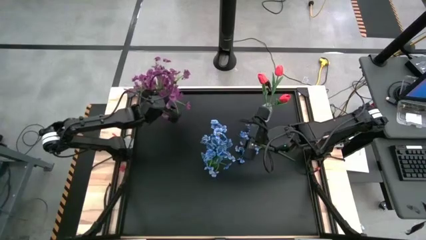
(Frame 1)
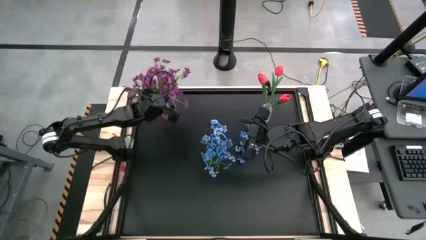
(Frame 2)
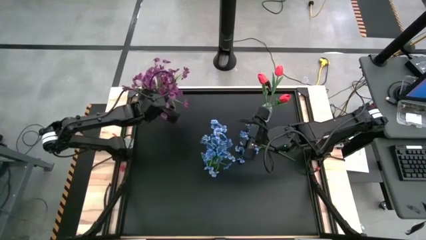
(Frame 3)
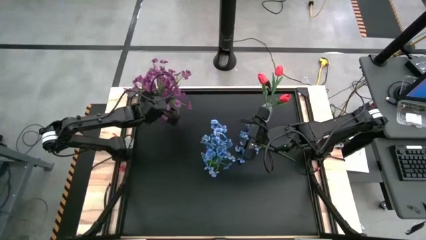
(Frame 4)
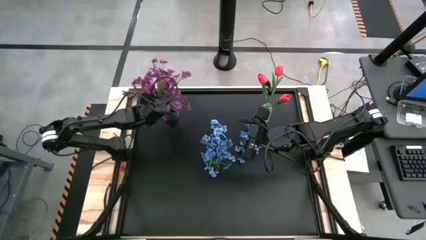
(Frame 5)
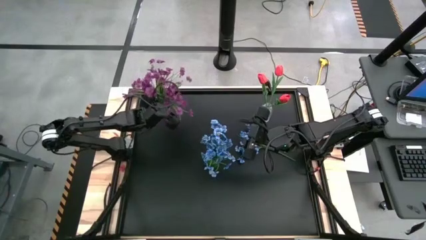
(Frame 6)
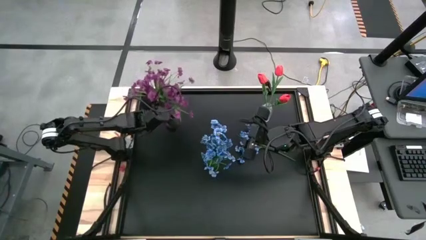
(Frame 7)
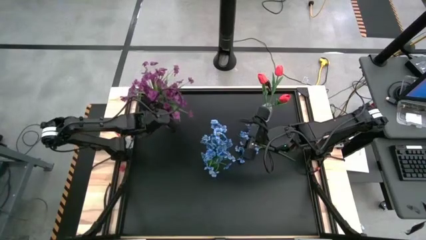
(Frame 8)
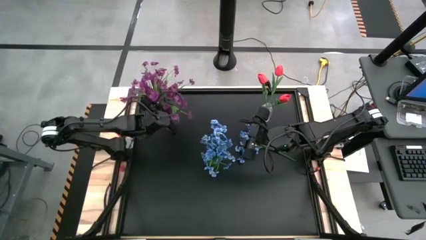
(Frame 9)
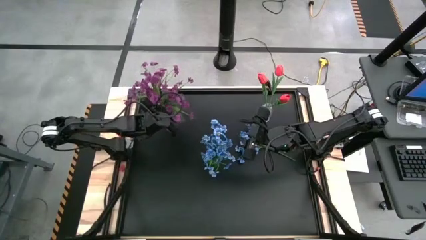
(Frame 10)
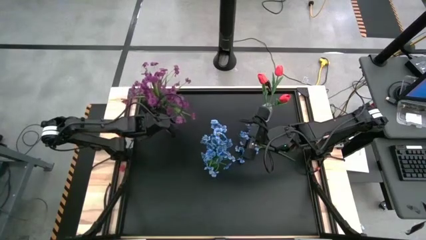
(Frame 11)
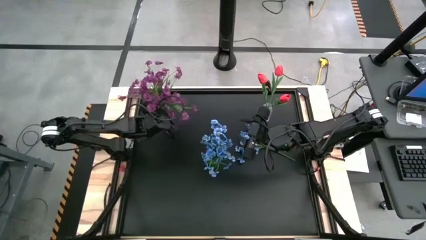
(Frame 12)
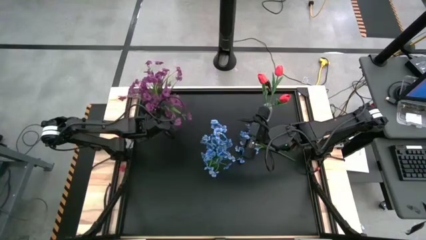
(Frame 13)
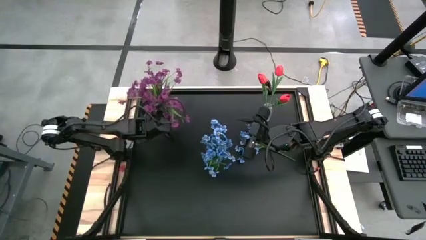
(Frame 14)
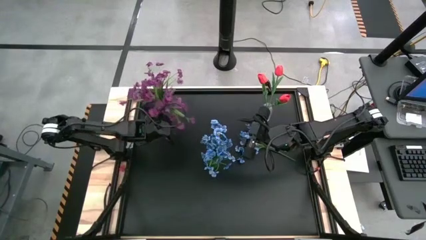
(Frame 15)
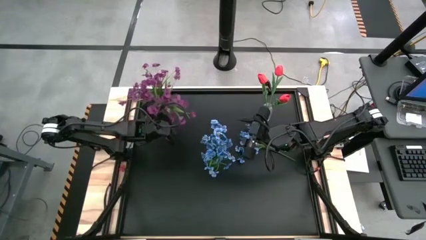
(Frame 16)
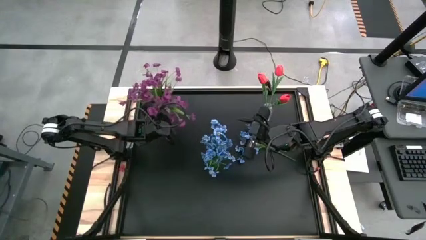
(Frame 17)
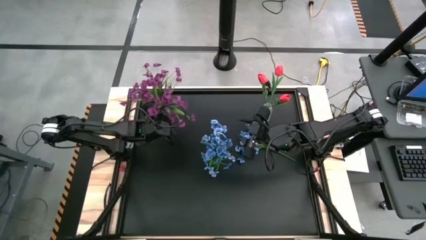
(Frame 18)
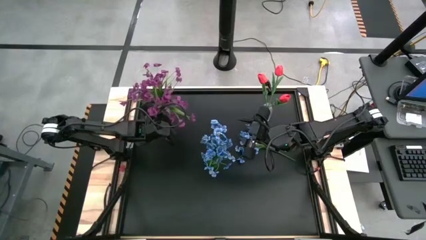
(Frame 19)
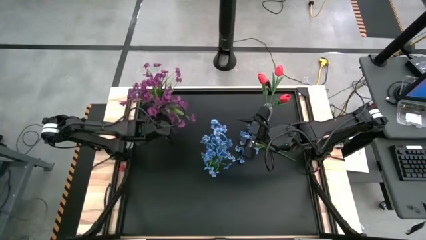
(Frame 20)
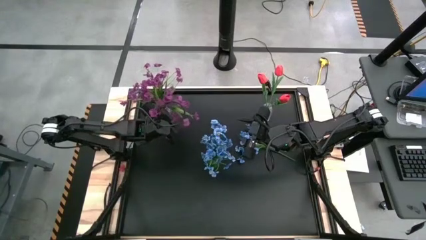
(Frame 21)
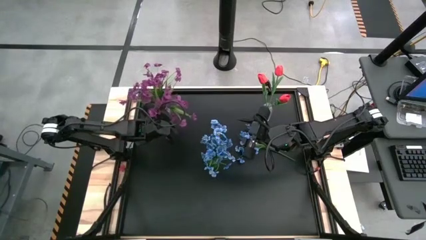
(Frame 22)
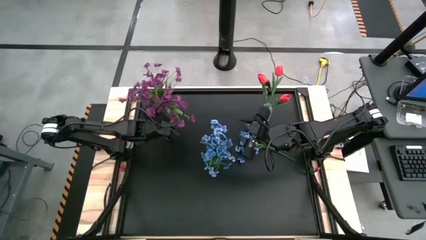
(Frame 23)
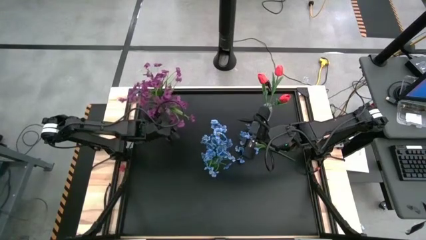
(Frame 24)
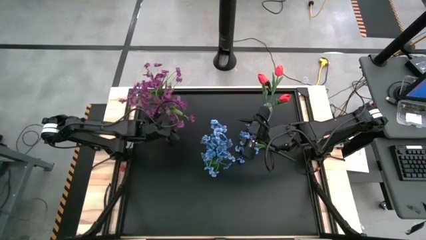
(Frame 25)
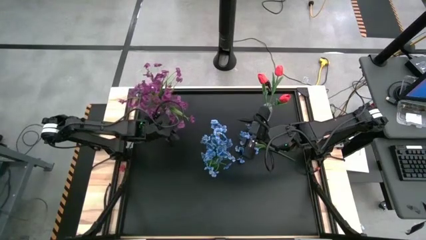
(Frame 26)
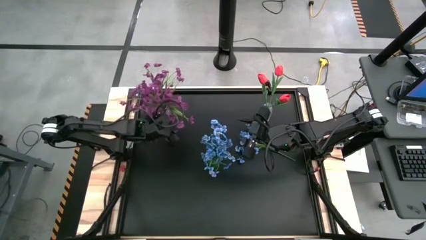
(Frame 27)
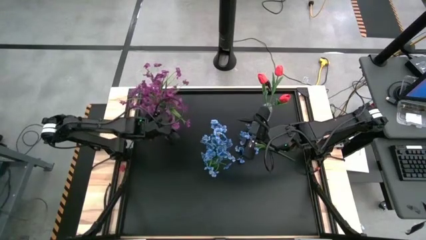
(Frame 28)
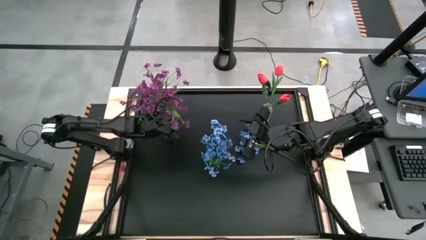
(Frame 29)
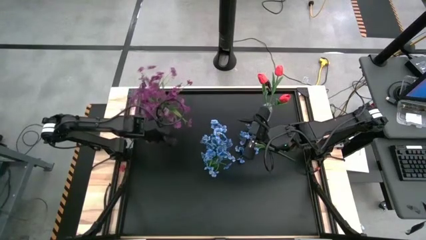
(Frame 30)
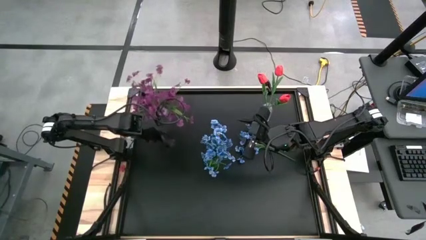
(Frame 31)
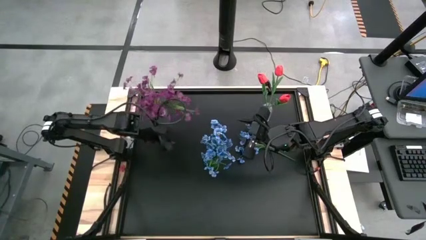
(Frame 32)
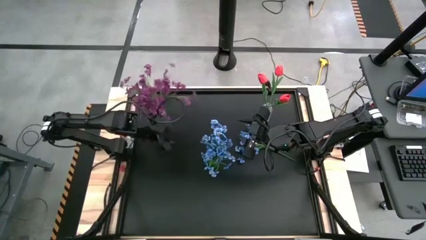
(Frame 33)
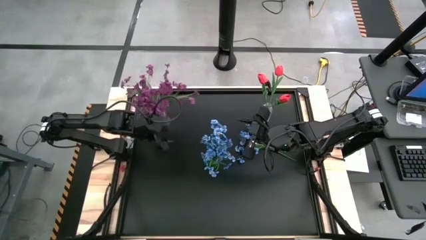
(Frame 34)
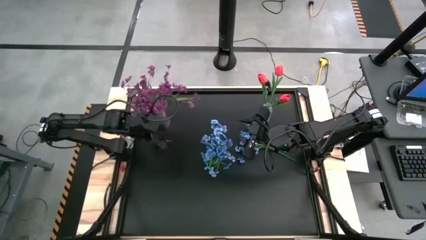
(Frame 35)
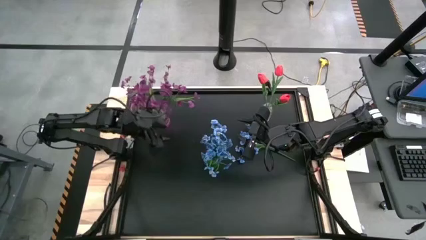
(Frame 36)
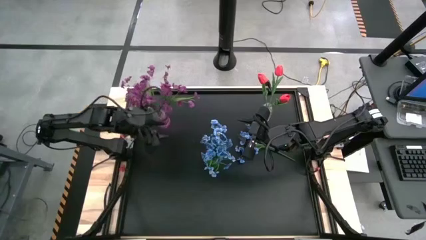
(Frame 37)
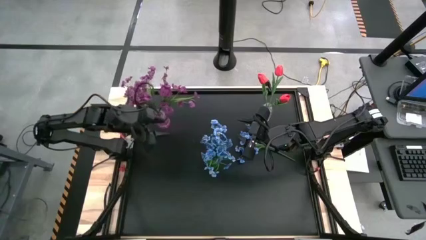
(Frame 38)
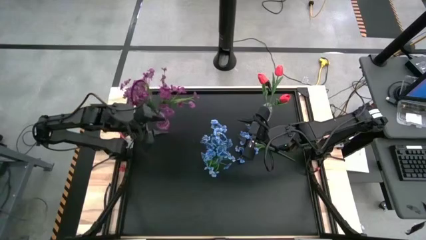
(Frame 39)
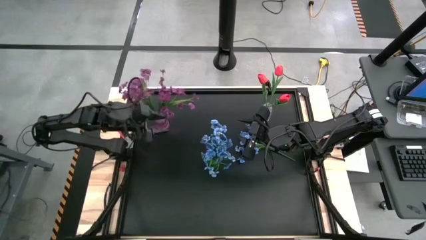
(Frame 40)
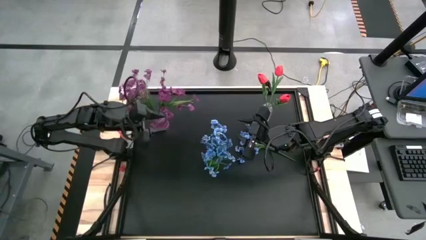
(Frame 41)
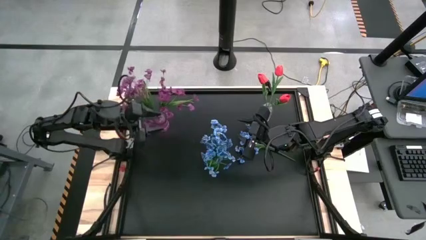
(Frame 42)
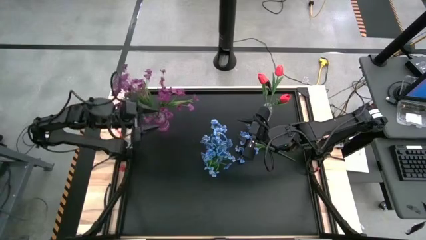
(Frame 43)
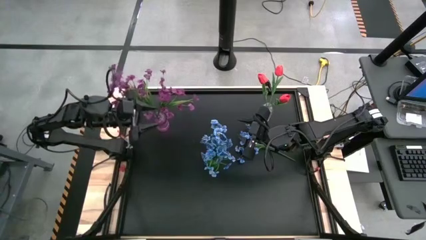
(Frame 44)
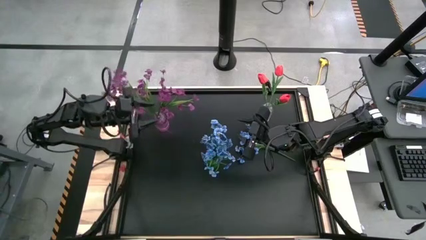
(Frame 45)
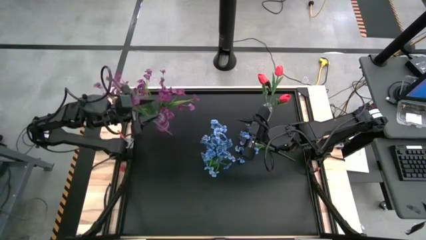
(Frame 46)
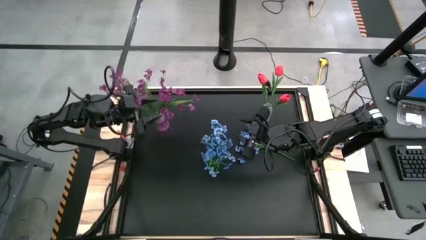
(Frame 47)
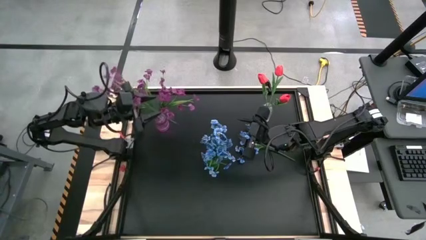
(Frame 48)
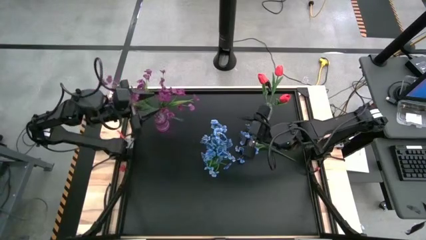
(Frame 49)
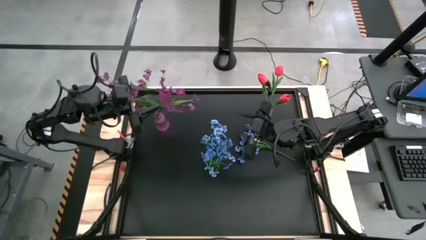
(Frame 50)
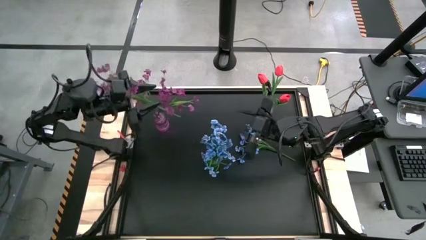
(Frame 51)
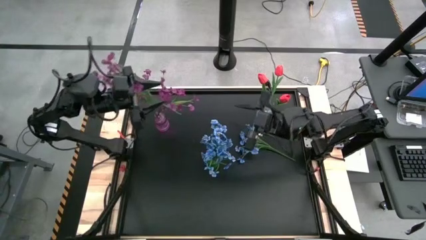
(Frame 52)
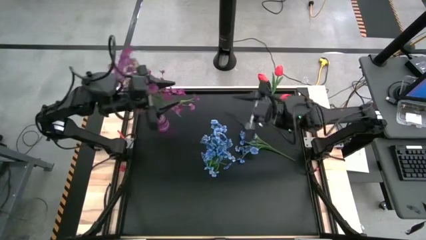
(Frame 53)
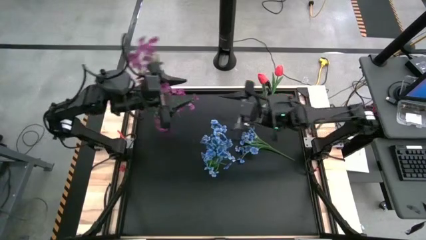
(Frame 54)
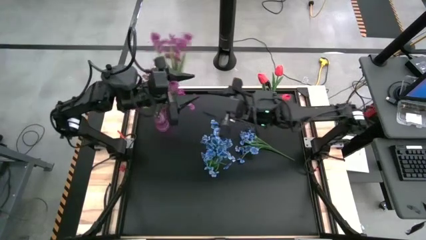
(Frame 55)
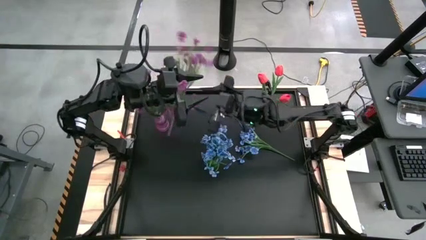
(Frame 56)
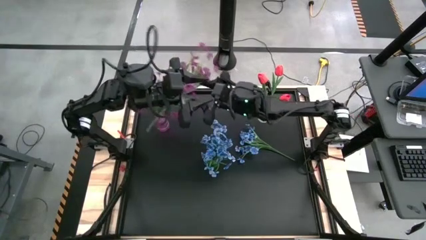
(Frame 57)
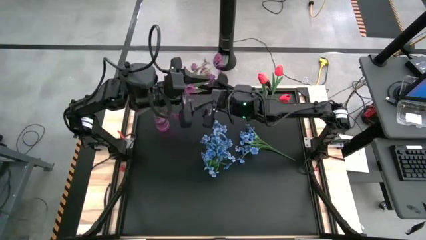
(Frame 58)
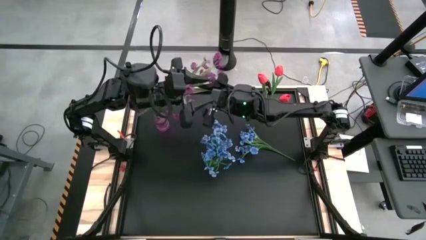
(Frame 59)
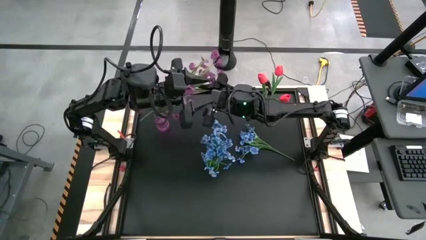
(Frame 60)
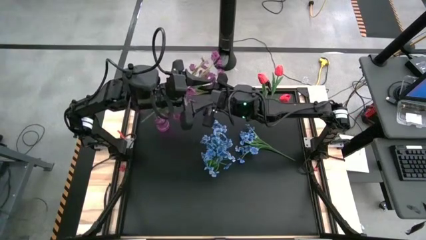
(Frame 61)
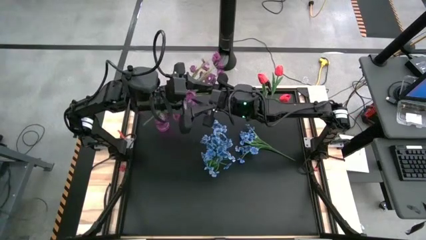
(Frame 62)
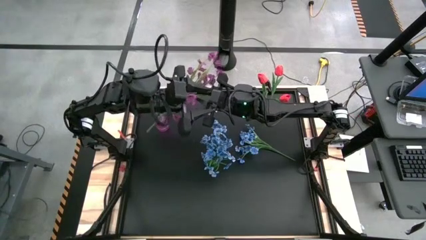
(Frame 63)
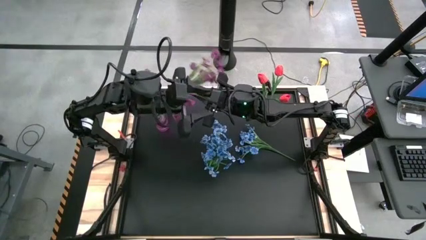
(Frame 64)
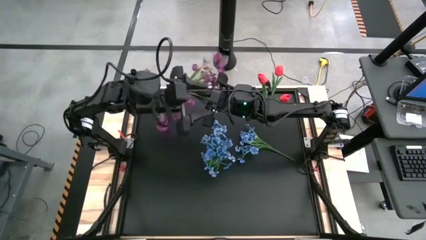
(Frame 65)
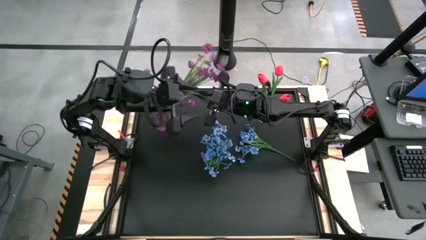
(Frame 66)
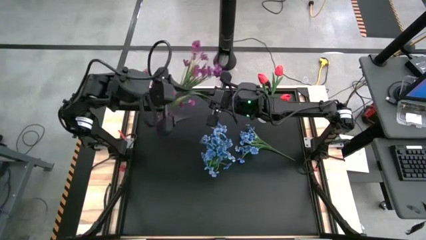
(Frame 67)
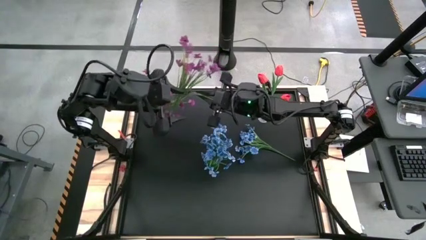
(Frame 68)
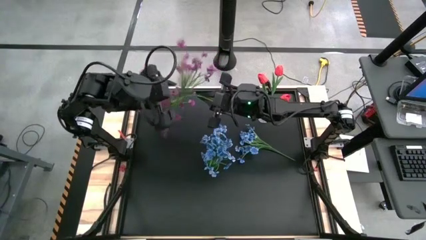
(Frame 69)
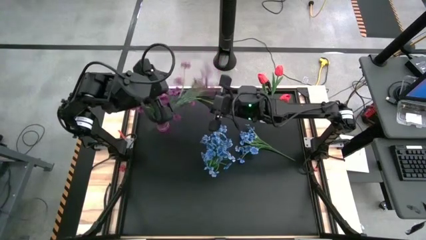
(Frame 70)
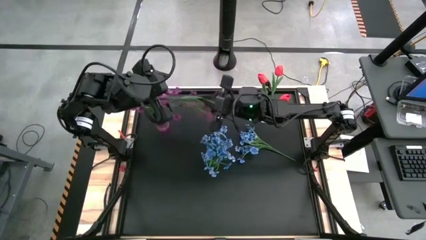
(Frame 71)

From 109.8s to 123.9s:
Task: Sort flowers into vase by color
Put the purple flower into the purple crystal vase
